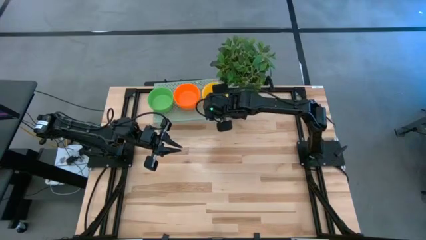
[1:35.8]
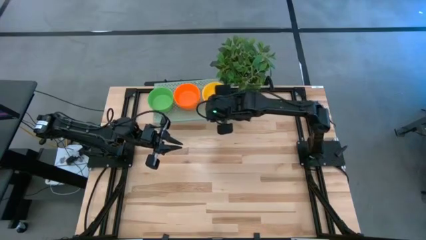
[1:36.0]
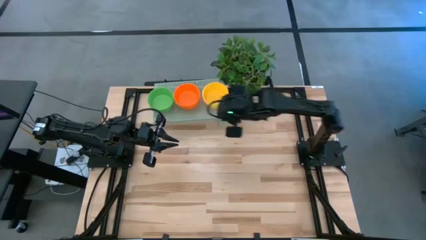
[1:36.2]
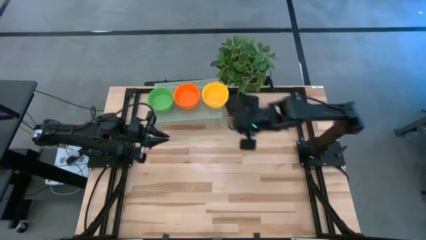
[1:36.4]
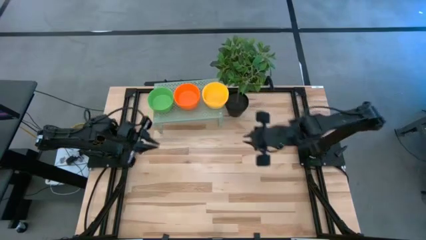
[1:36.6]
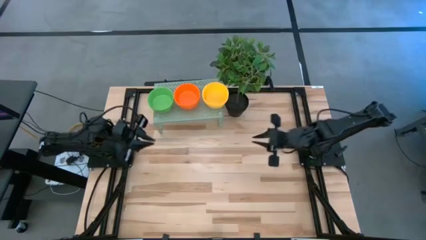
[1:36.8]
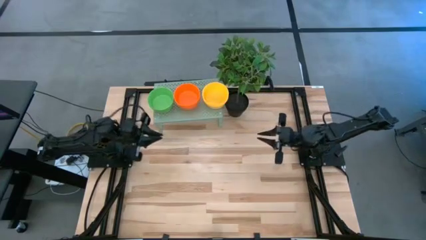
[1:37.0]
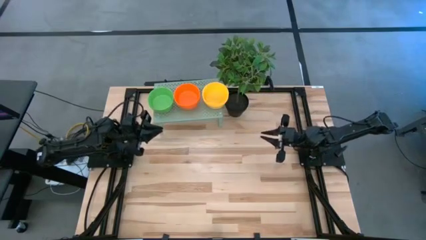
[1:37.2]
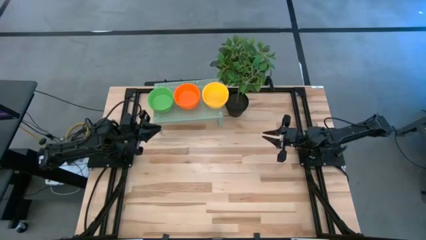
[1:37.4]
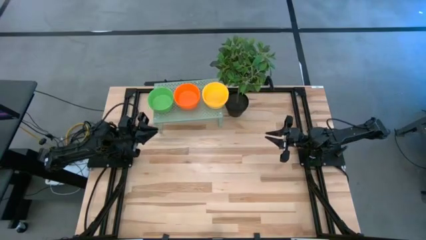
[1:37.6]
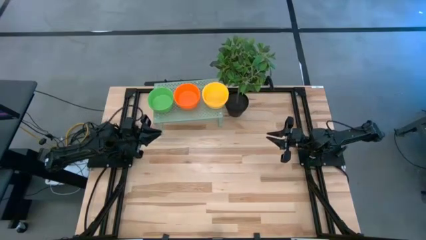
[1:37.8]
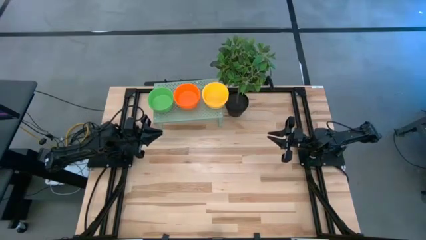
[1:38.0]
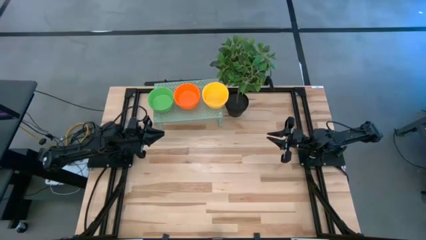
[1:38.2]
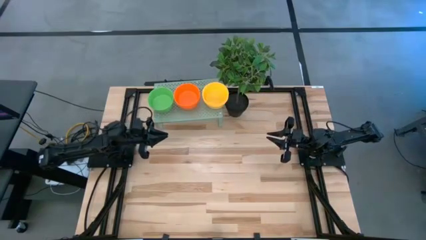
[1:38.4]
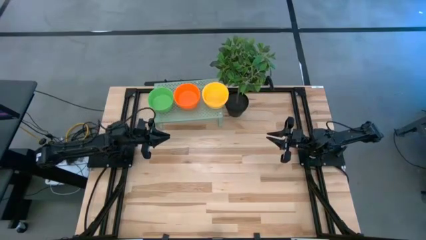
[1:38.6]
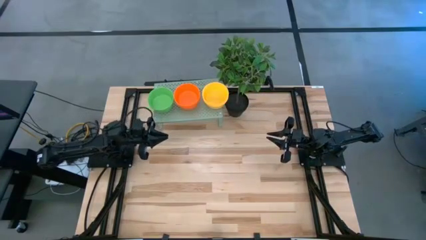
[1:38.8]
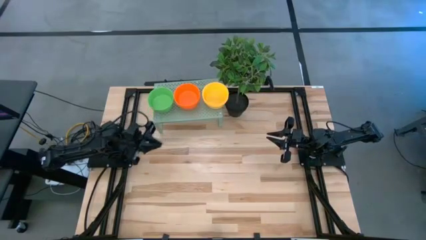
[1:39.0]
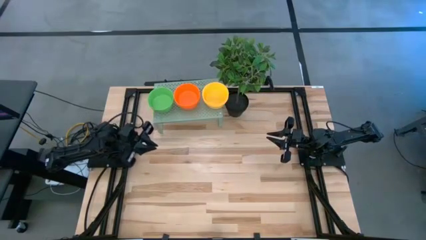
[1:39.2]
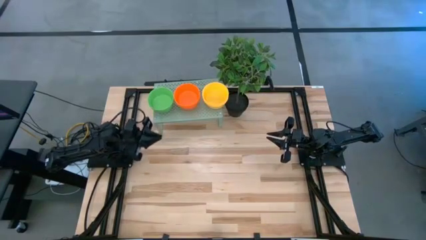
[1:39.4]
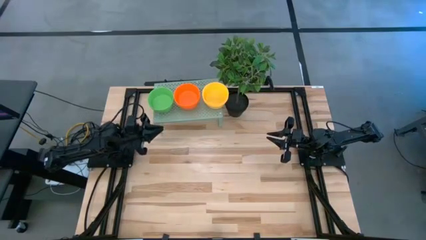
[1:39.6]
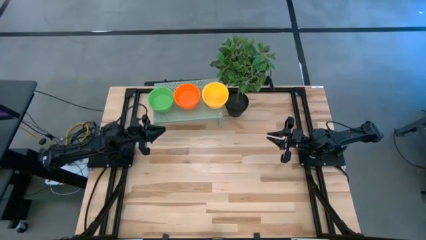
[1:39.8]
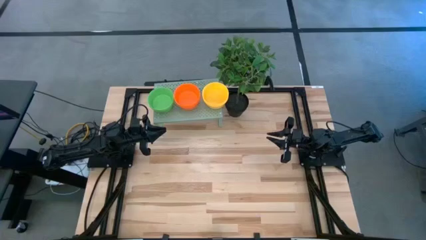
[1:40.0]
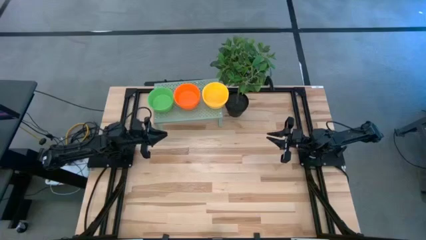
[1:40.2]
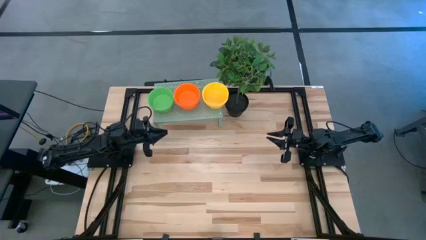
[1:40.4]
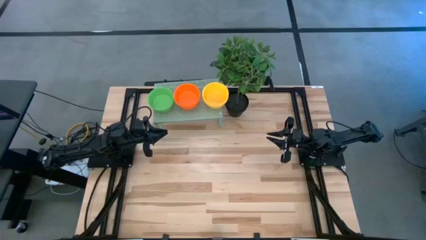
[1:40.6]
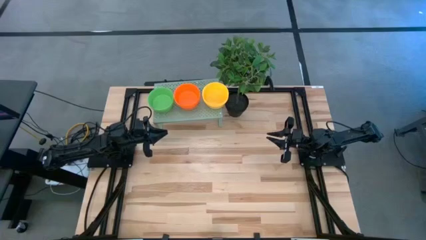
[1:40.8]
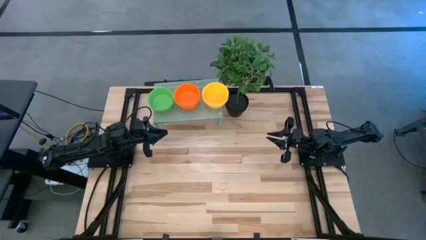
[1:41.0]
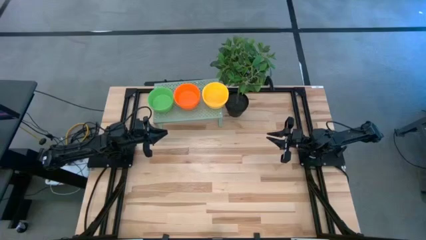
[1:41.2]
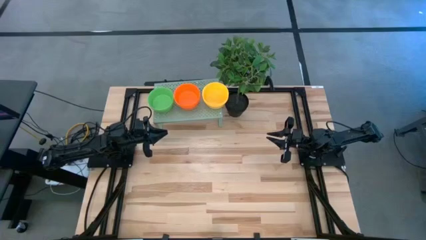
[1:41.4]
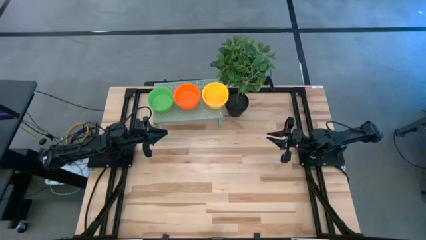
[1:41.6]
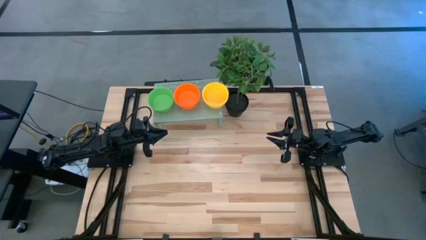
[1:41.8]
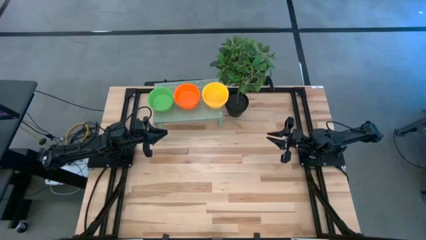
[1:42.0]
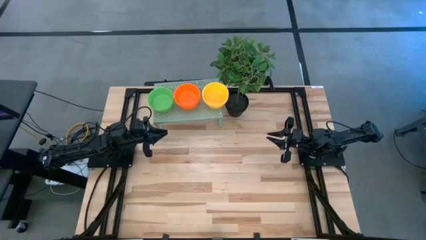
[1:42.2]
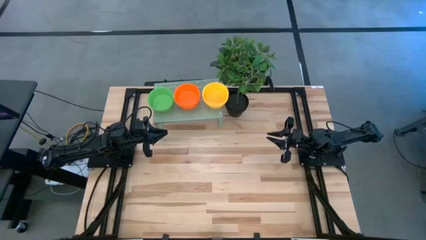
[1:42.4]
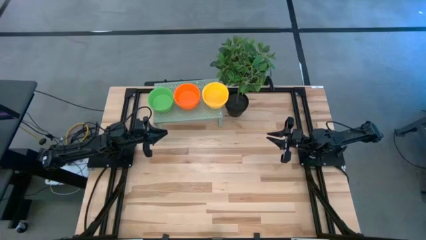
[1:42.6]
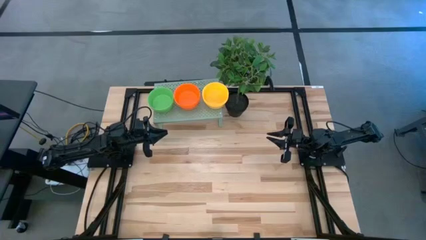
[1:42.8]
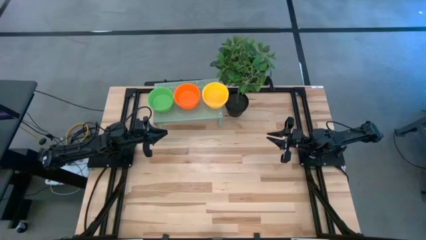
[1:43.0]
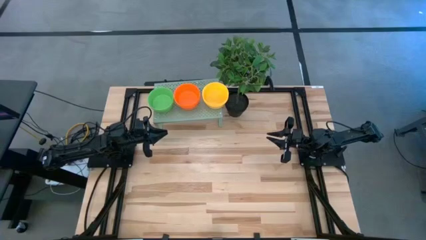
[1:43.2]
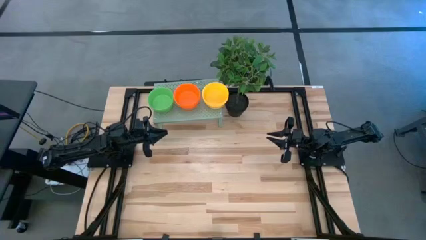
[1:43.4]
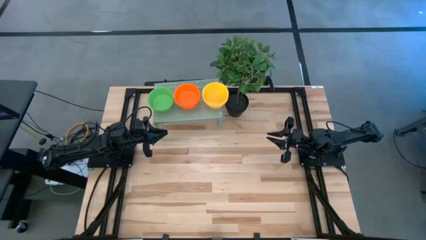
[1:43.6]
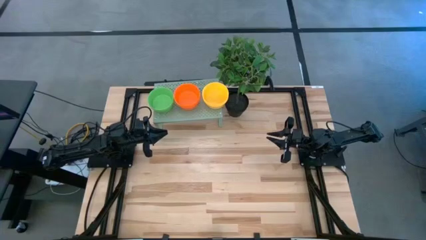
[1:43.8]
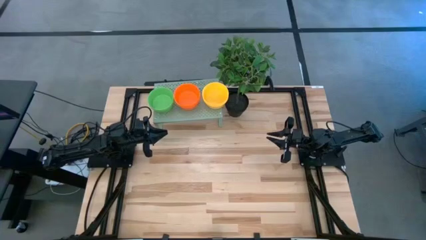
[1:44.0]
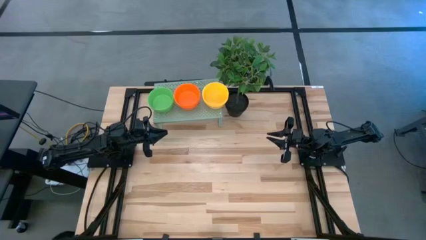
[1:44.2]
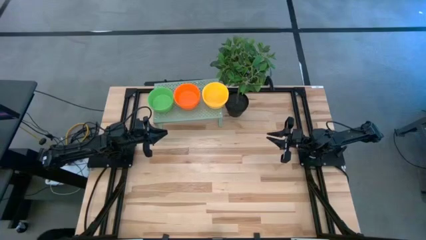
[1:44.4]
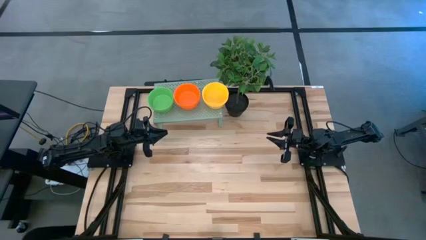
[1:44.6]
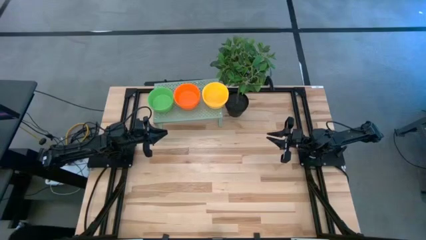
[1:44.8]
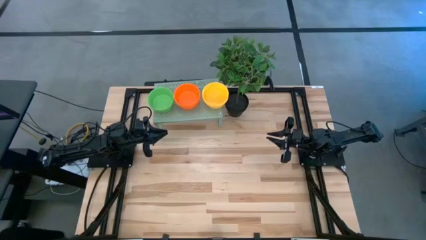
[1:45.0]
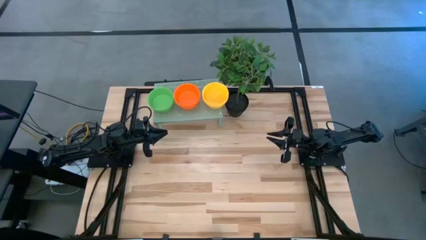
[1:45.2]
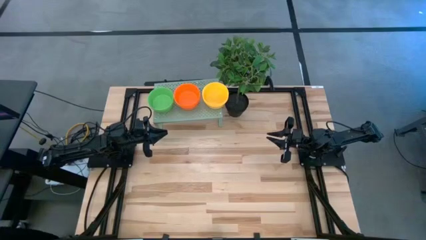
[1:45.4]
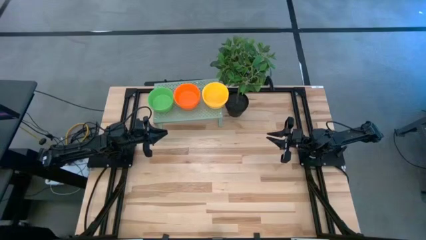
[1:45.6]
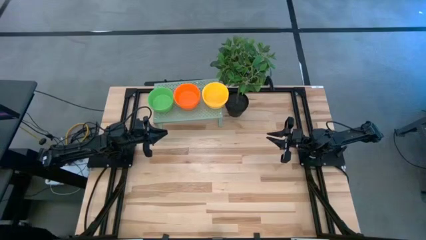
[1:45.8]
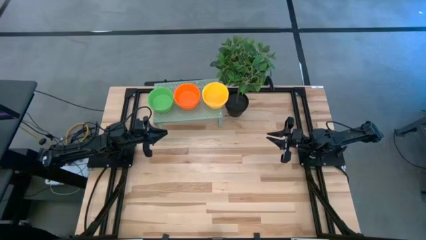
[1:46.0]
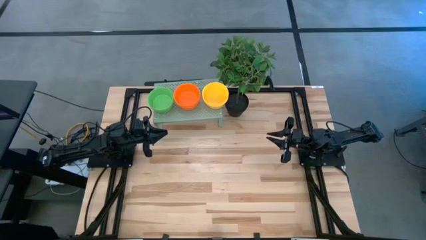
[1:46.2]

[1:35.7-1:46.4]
Task: Pick & Place Mini bowls
Return to Home Position

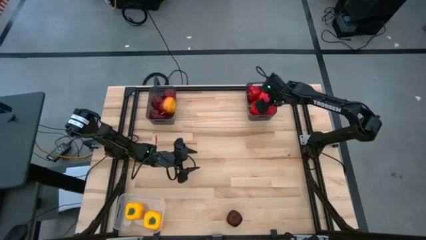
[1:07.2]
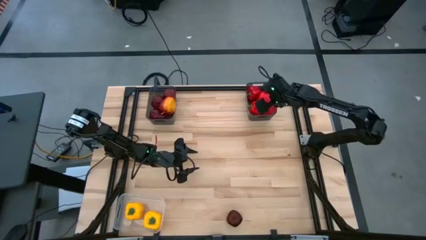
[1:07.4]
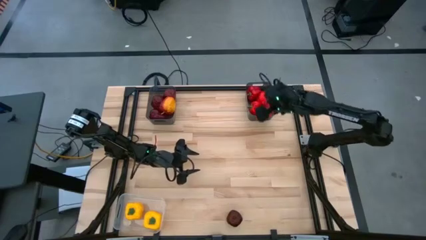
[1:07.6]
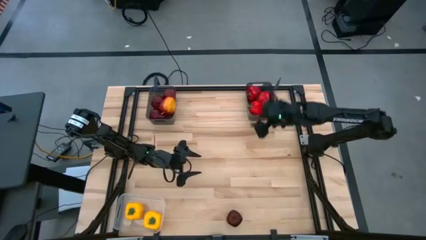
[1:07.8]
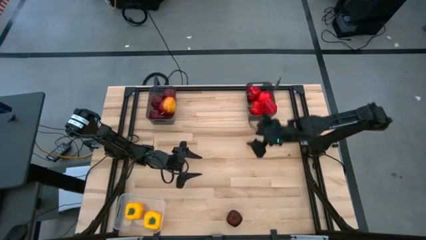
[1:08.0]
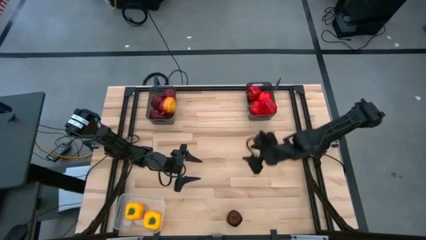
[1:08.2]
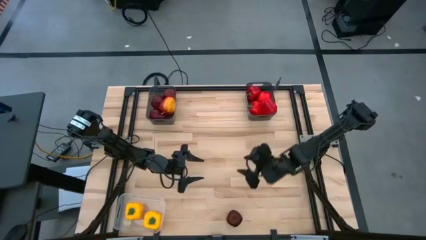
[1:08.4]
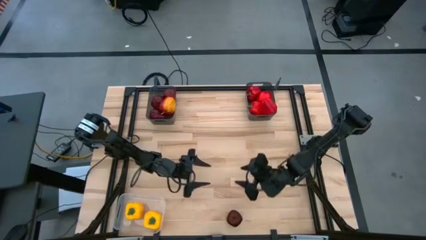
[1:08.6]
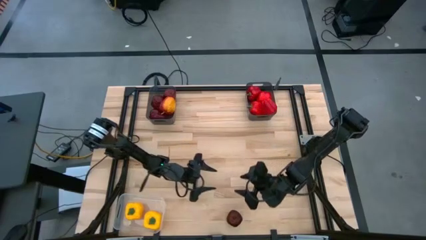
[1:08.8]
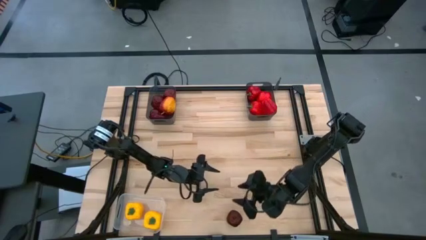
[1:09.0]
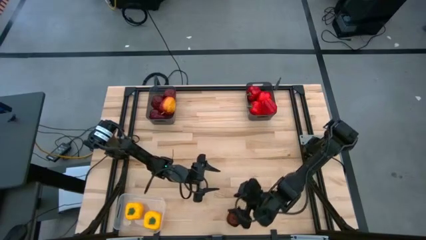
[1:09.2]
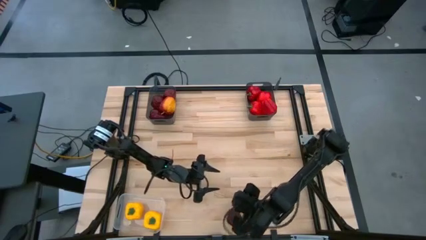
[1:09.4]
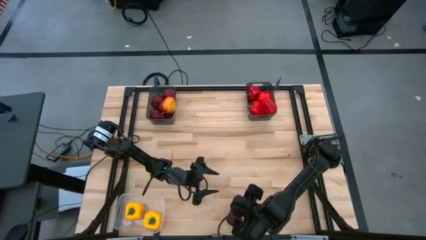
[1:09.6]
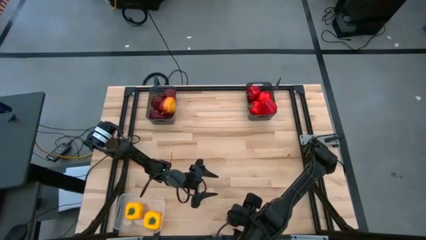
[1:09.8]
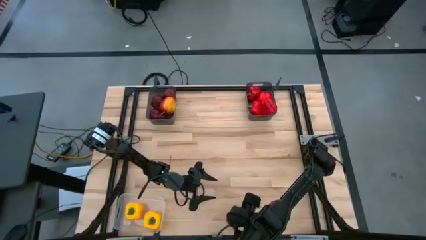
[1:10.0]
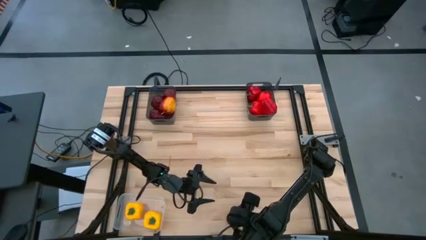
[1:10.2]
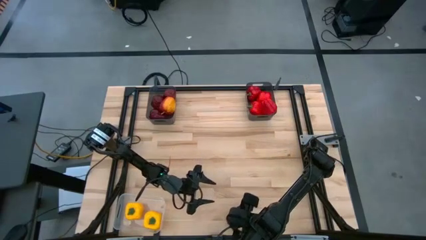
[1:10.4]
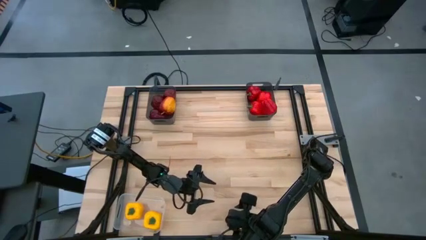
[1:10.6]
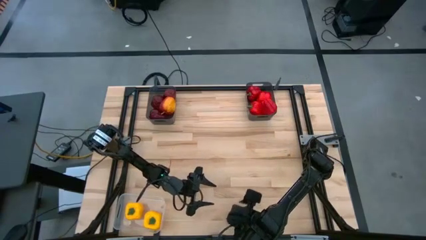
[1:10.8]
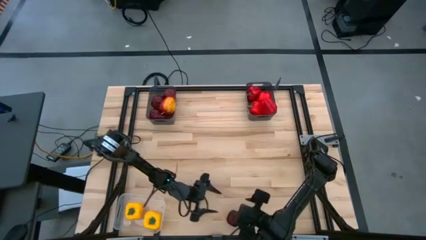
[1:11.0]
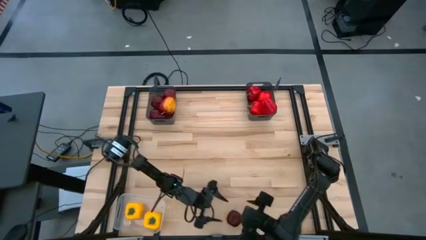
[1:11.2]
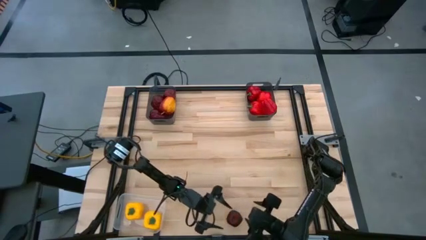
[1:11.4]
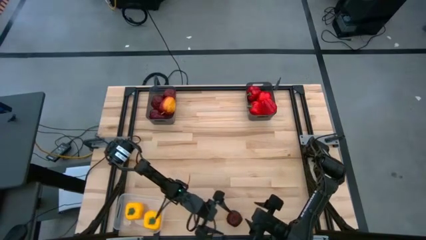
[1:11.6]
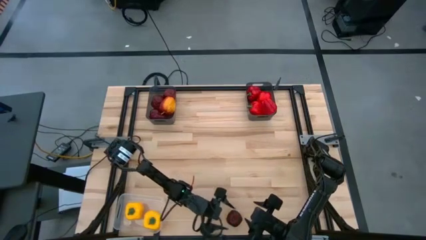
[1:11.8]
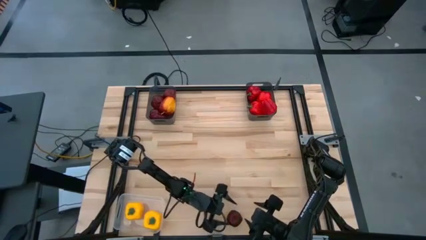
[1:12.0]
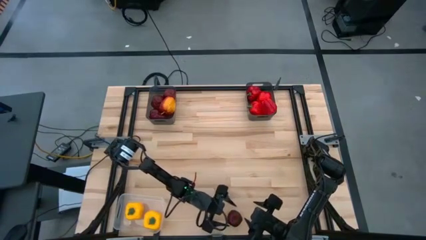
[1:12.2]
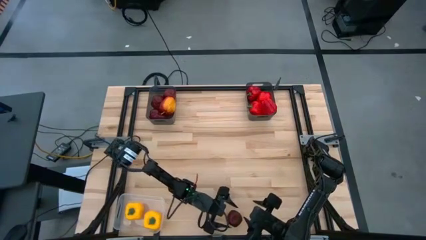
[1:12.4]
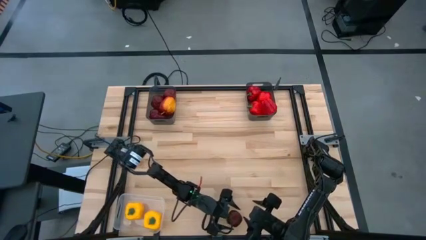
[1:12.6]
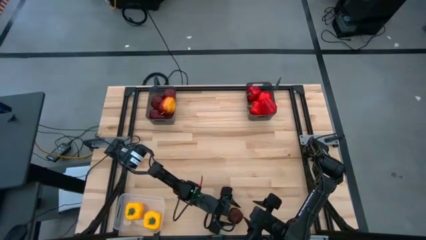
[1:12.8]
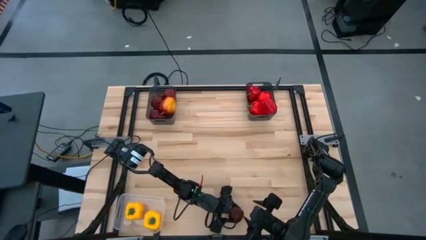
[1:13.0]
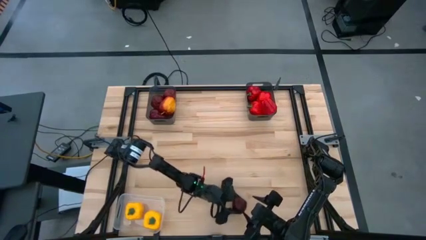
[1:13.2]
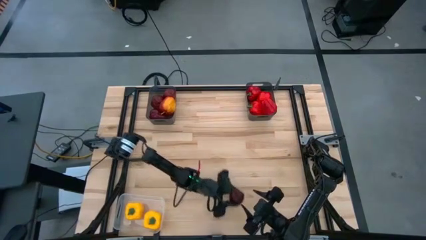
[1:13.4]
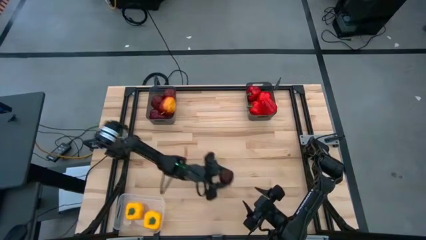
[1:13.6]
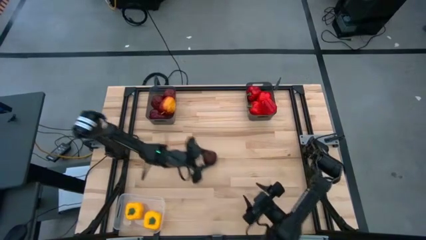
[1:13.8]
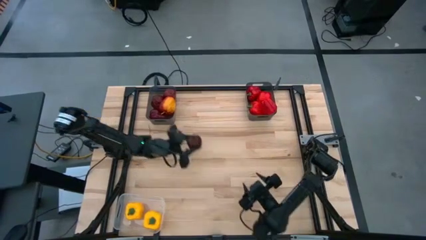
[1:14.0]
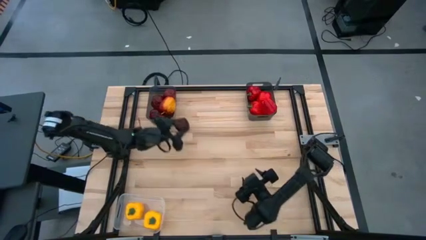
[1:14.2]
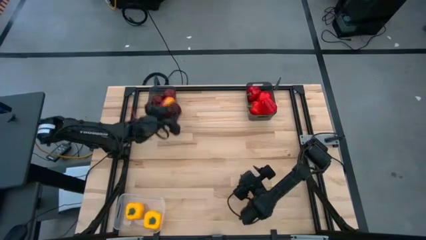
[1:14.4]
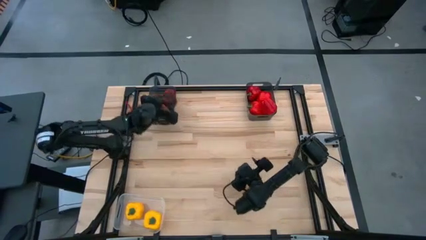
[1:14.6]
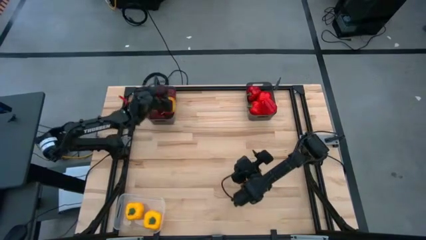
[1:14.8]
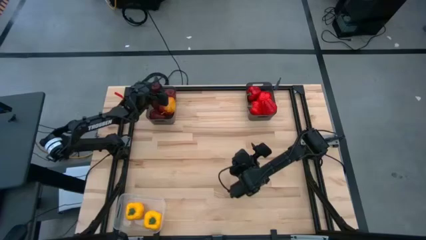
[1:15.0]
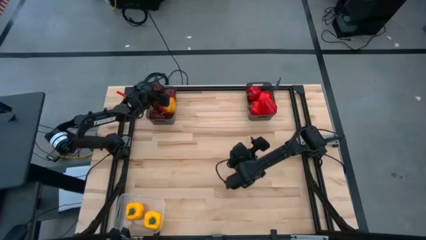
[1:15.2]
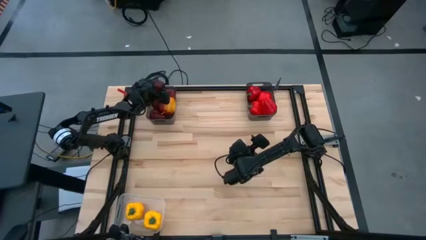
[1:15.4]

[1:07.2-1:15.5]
Task: Sort produce into baskets
Put the red apple into the left black bin
